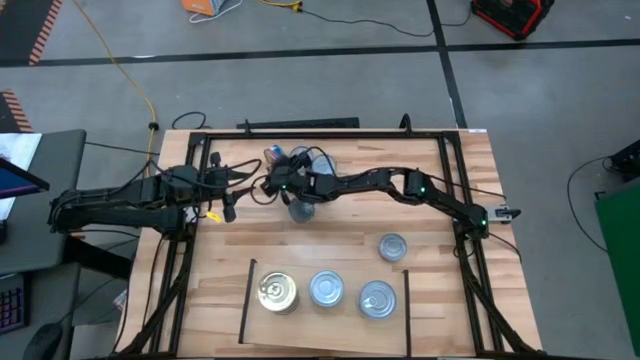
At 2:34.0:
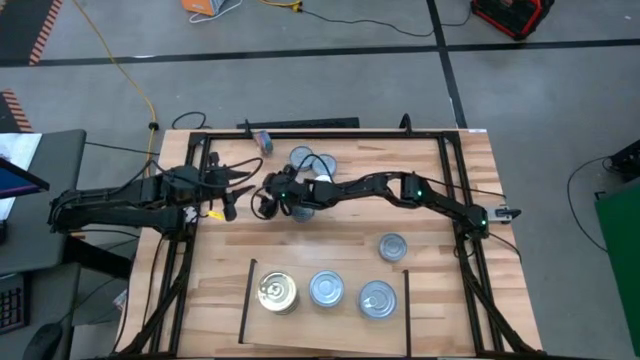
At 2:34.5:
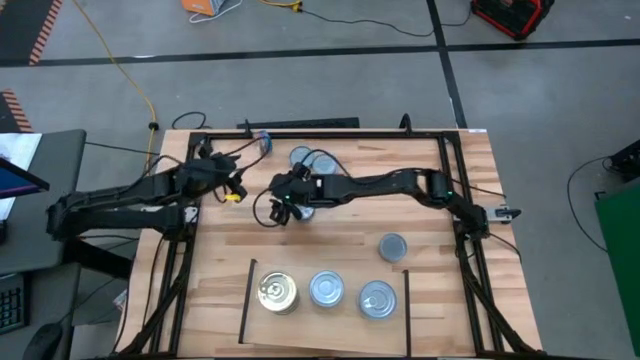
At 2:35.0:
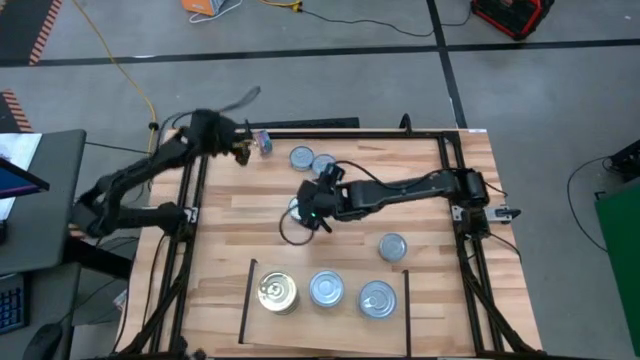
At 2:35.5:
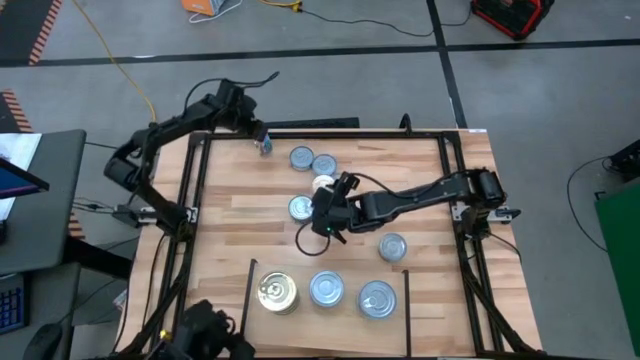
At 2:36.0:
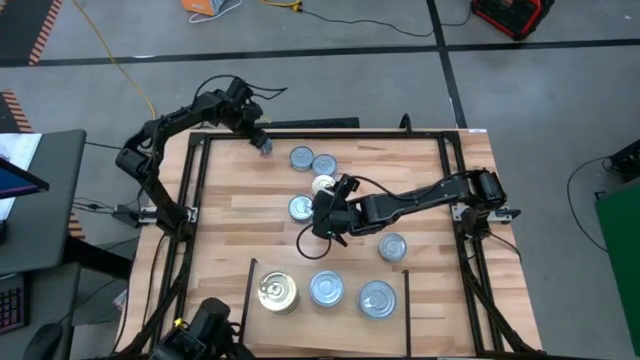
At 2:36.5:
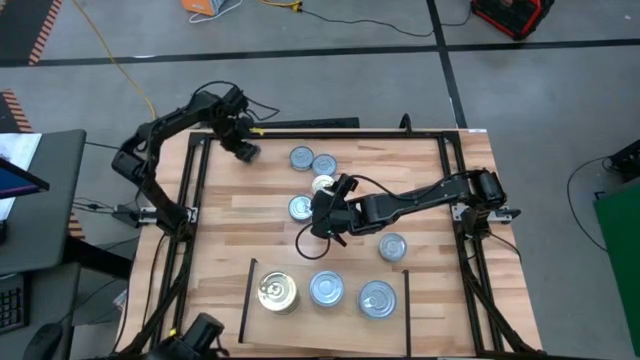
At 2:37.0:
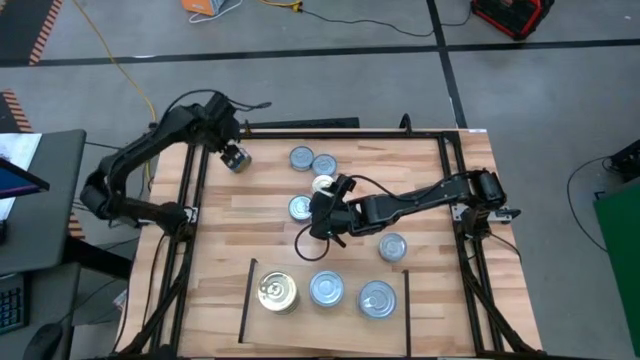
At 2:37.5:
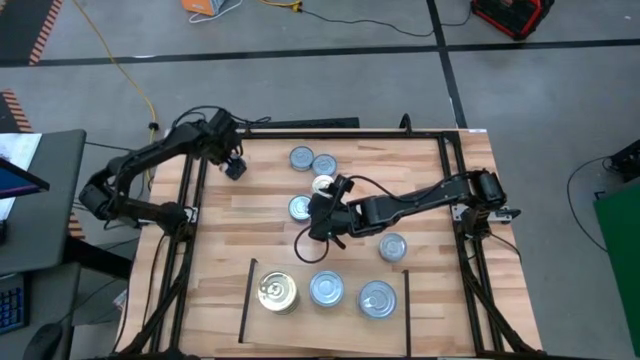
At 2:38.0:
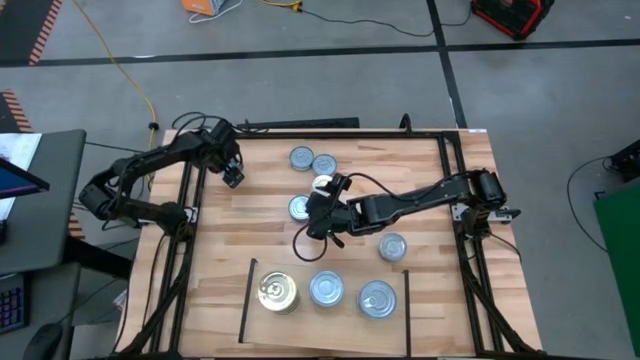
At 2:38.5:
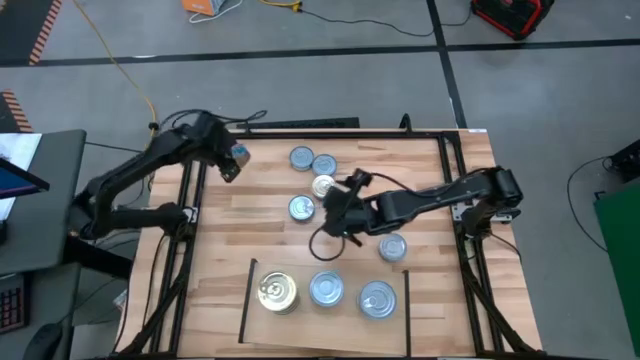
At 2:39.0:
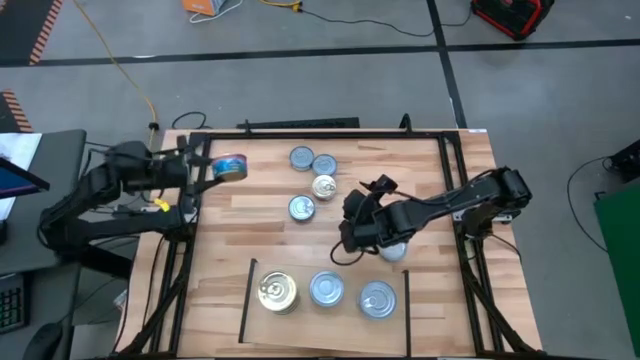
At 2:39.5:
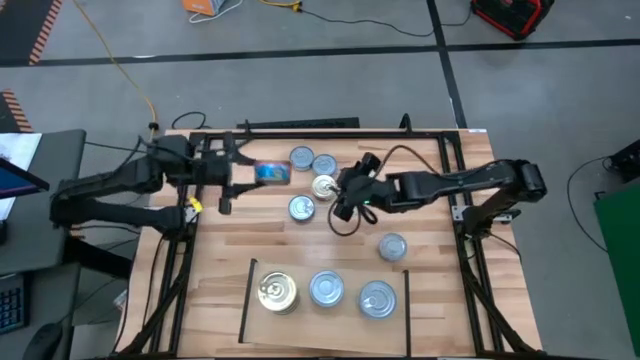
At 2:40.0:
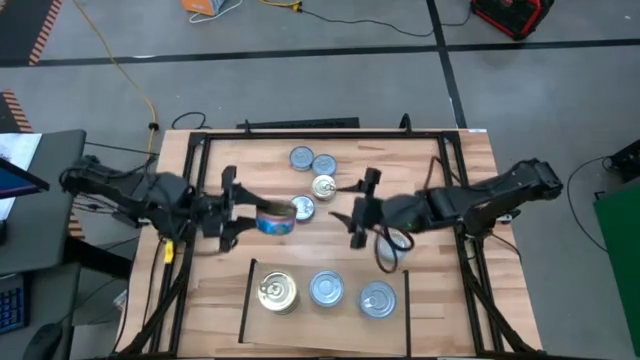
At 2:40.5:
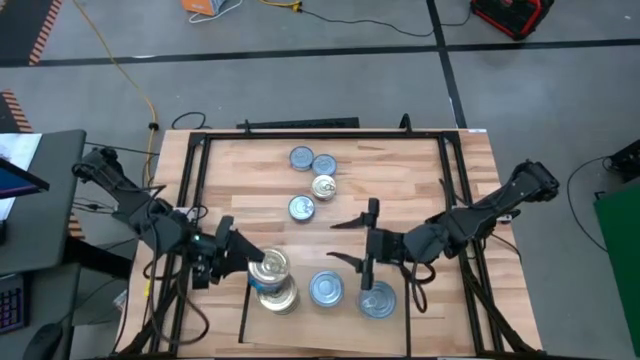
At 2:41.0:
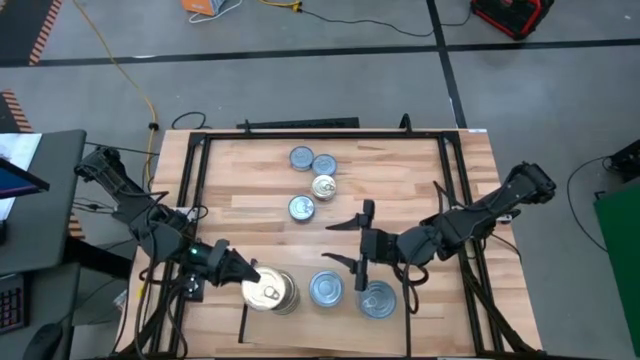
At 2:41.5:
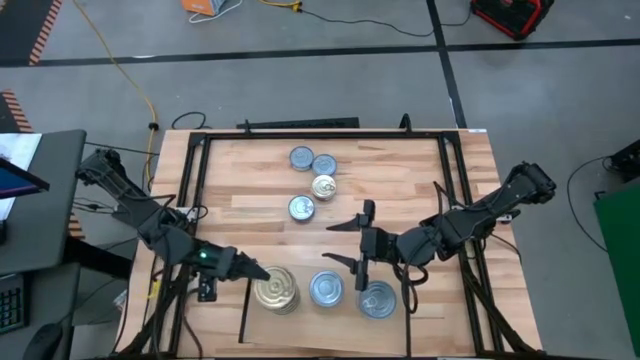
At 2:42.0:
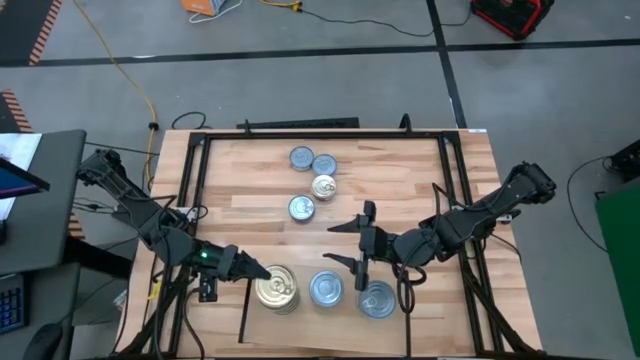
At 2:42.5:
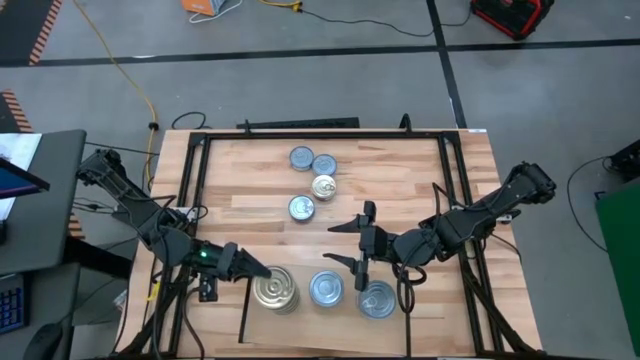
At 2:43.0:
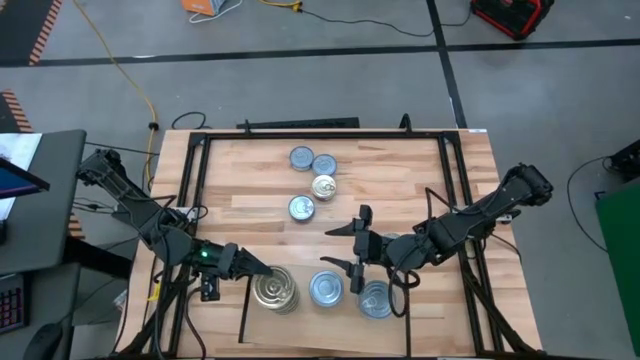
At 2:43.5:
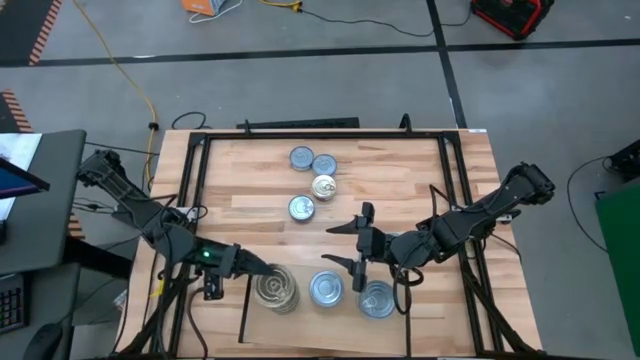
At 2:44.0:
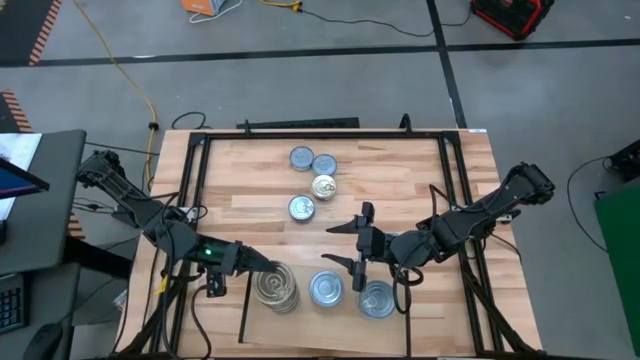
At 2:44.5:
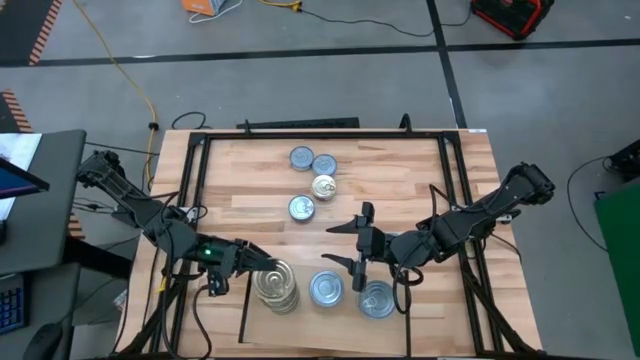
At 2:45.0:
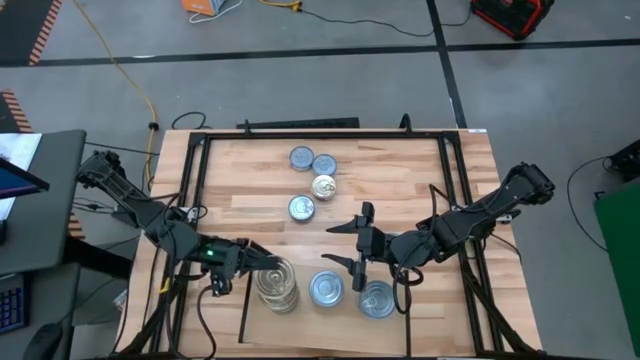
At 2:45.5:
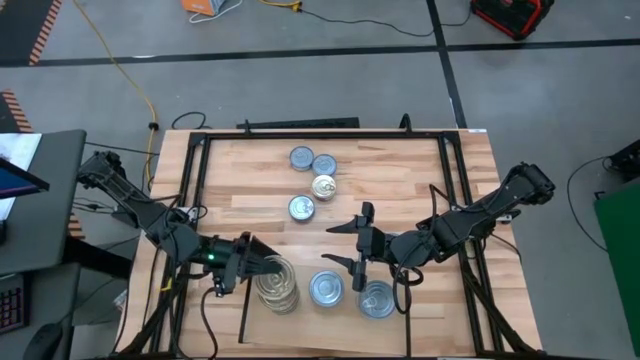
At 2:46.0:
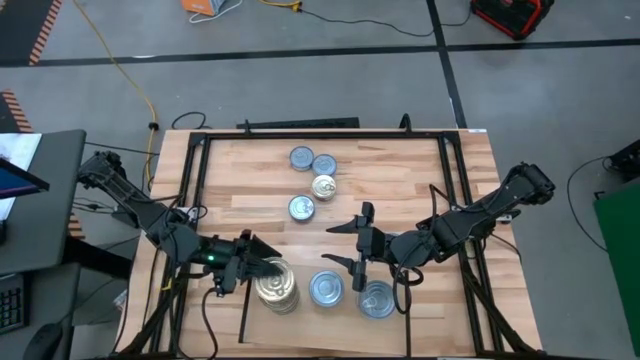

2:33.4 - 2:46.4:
Task: Stack canned seafood by type on shelf
Put the top blue and pink tuna can on the top of the left stacked tuna cans on the shelf

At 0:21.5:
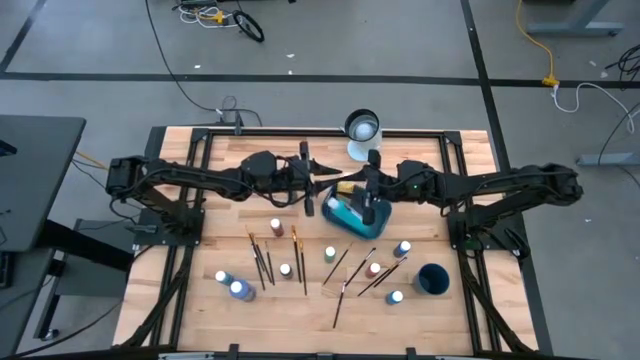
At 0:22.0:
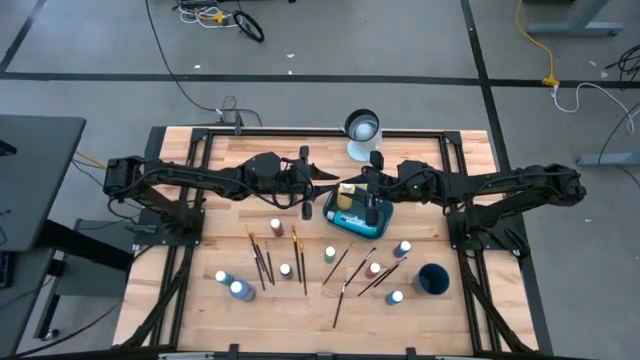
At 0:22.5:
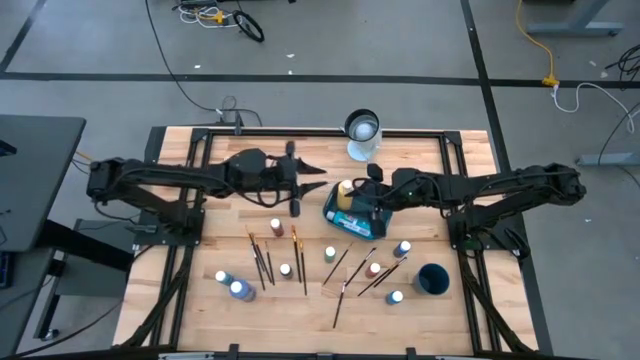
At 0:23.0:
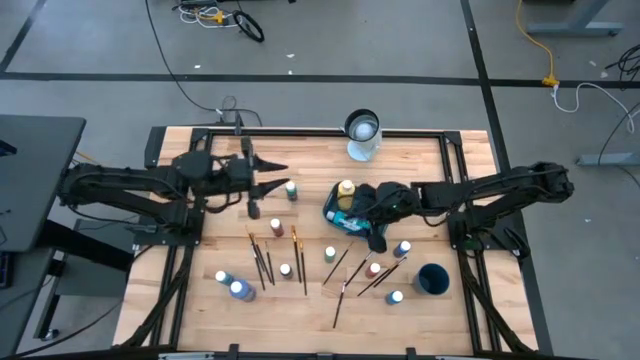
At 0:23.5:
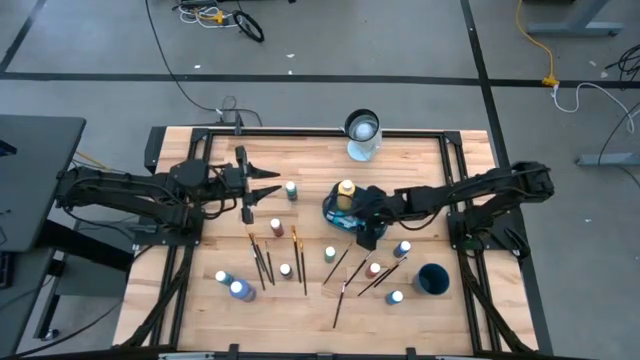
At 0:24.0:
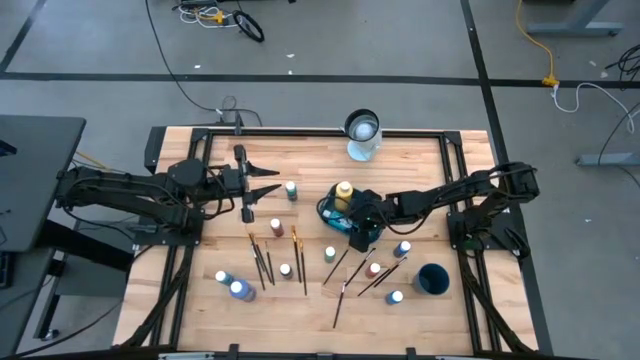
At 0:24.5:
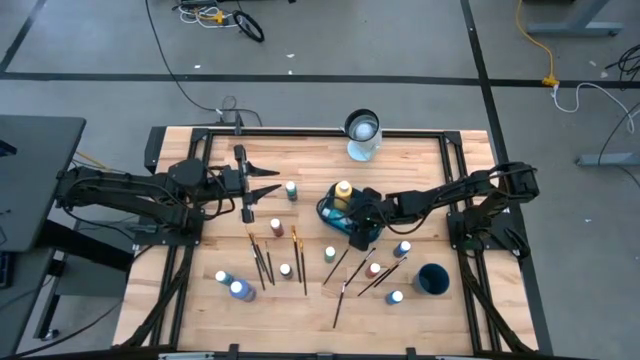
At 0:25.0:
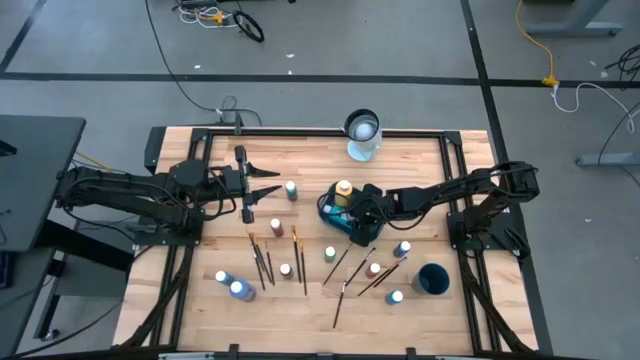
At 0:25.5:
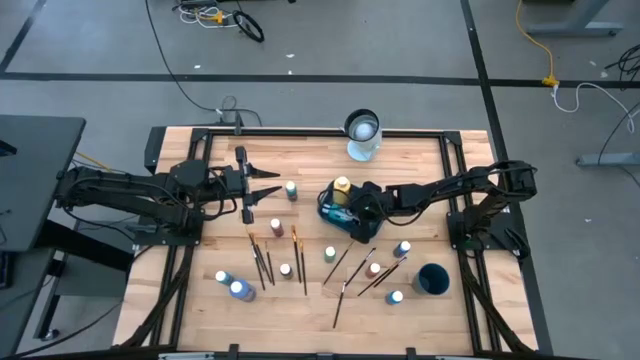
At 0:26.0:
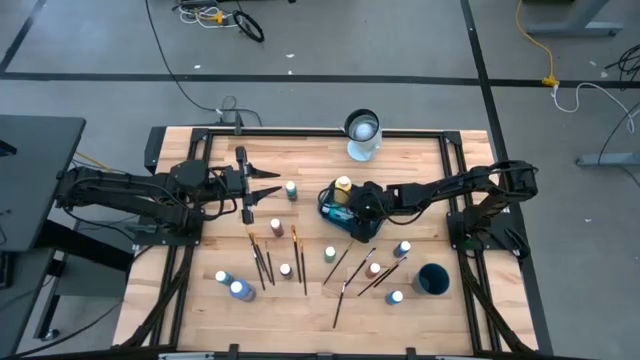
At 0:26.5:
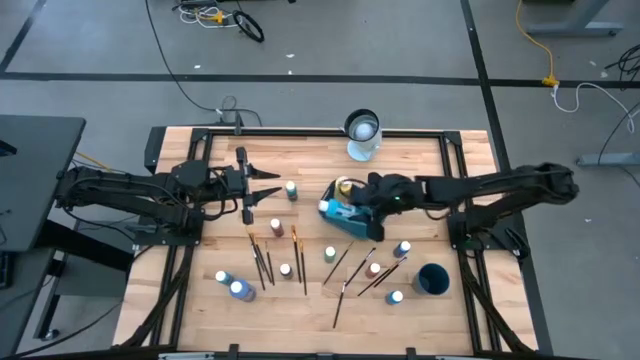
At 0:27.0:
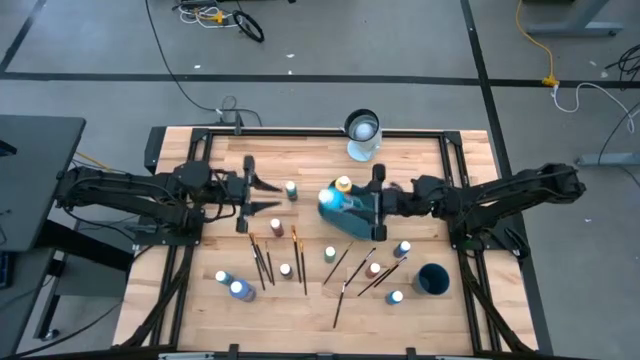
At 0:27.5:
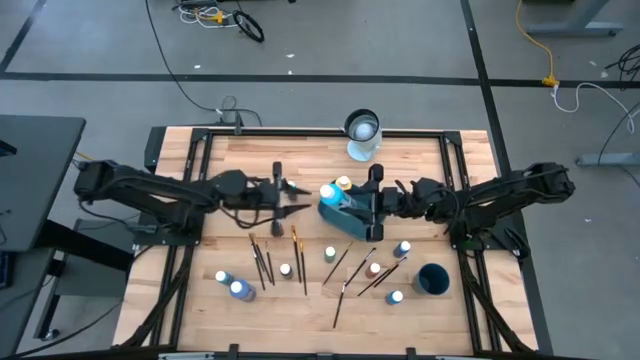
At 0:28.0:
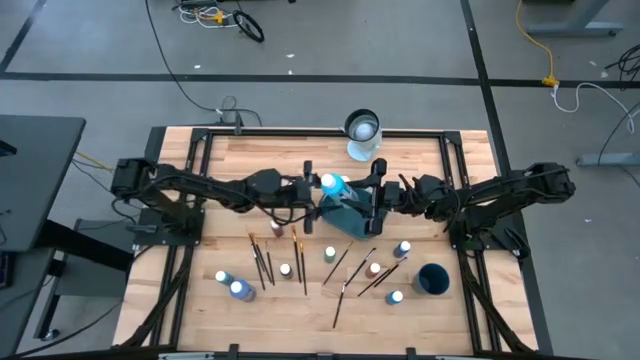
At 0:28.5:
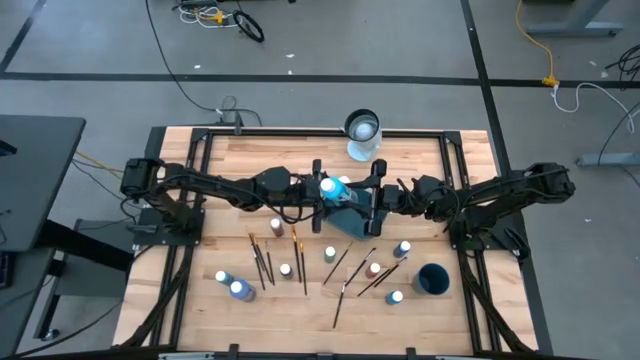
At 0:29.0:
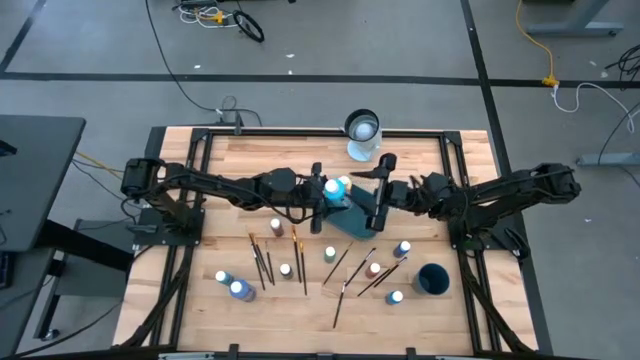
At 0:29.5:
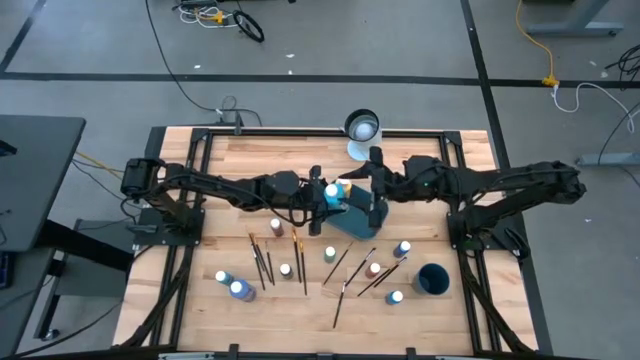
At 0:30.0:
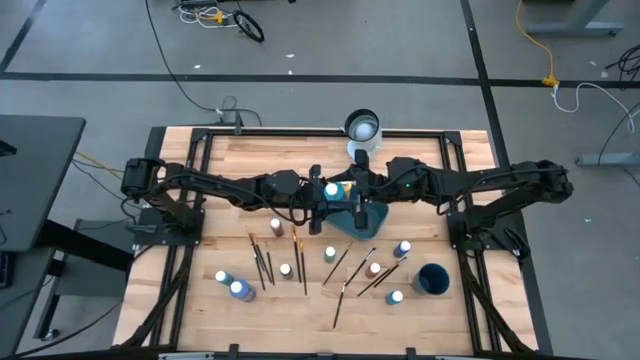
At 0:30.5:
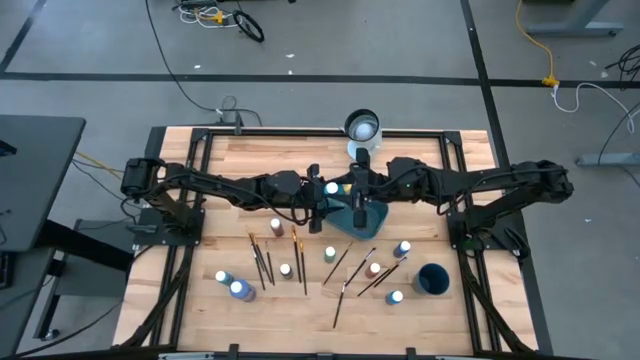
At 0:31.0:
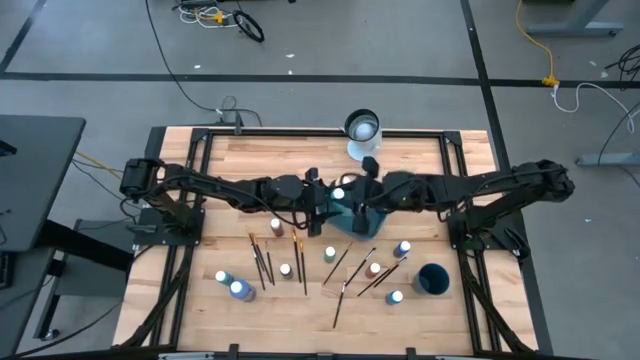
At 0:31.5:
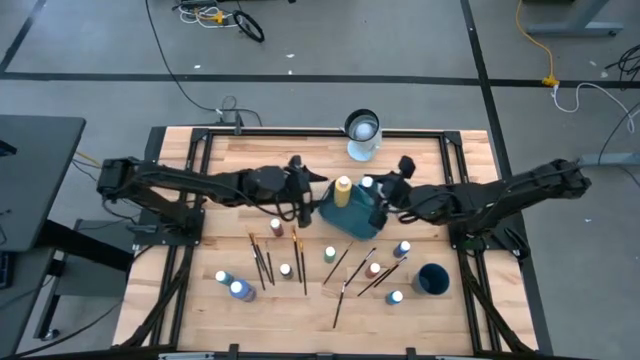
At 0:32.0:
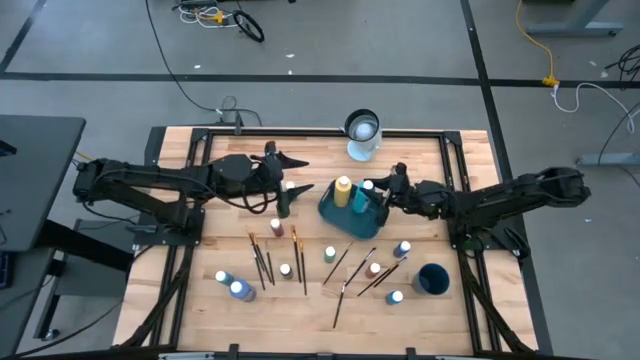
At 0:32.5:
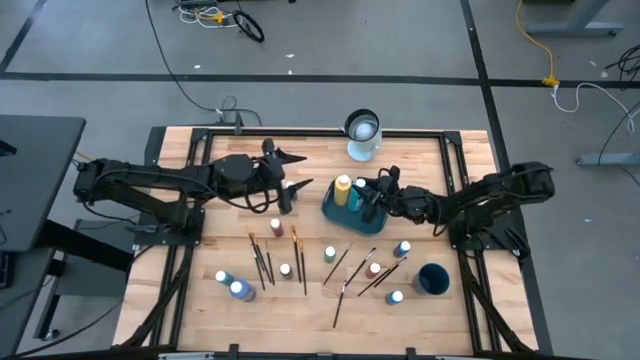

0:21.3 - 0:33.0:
Task: Pick & Place Paint Supplies
Put the large light blue paint bottle into the green bin
